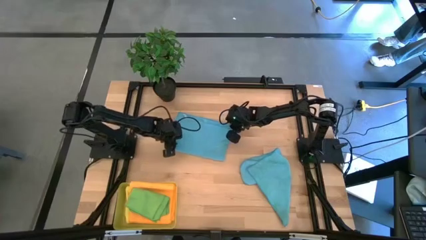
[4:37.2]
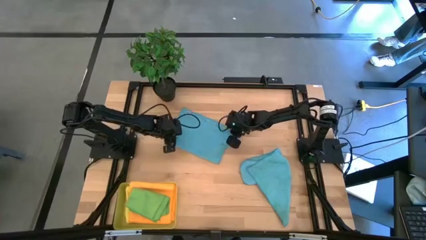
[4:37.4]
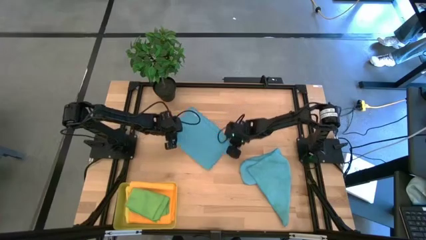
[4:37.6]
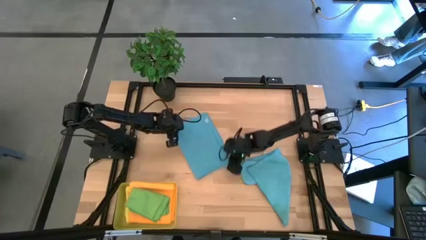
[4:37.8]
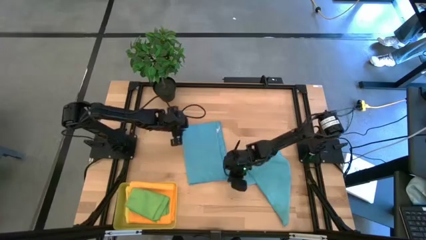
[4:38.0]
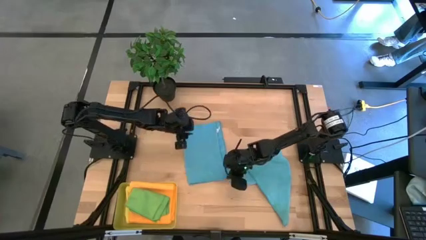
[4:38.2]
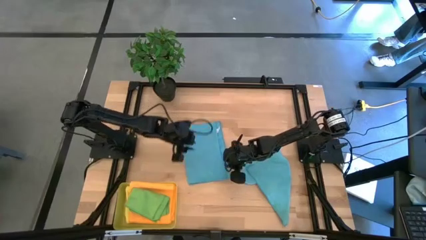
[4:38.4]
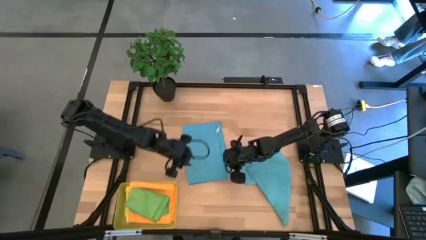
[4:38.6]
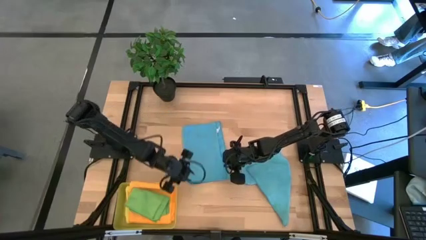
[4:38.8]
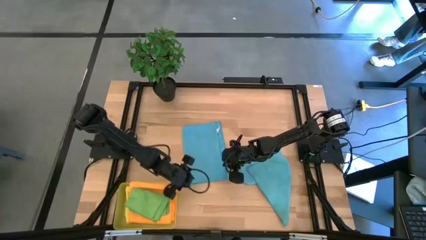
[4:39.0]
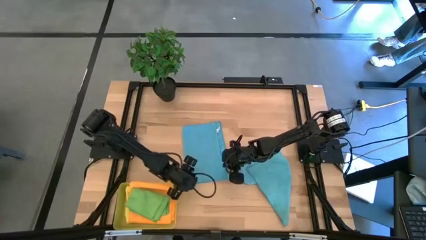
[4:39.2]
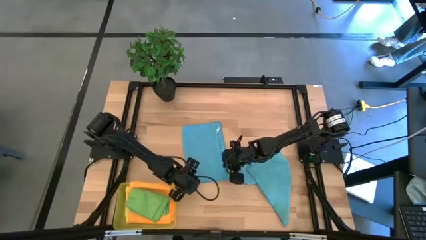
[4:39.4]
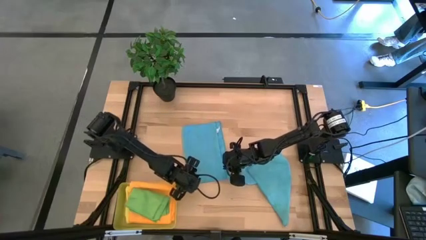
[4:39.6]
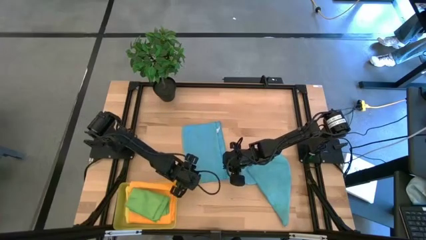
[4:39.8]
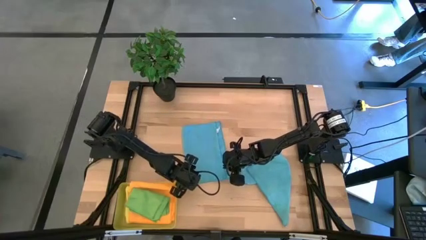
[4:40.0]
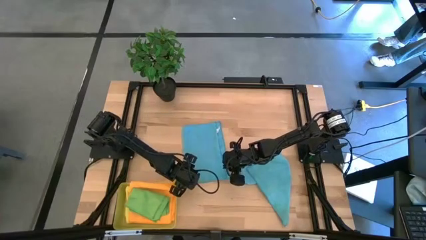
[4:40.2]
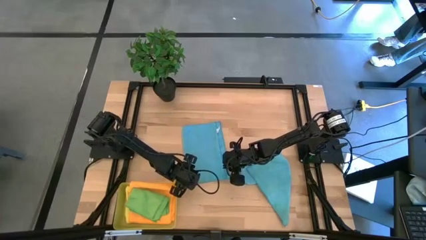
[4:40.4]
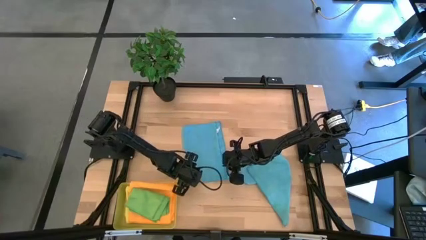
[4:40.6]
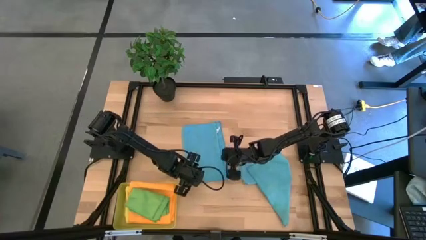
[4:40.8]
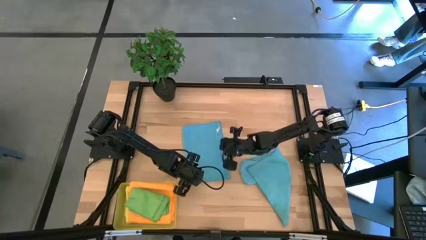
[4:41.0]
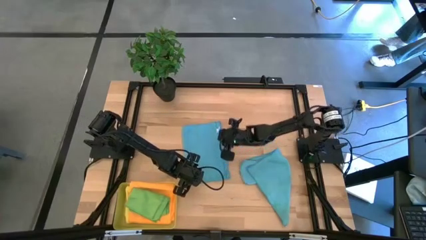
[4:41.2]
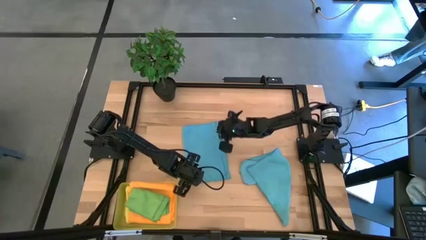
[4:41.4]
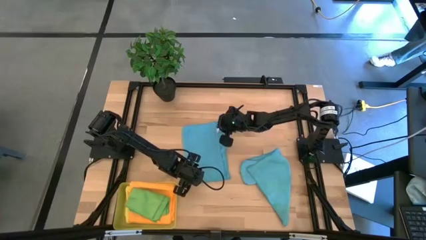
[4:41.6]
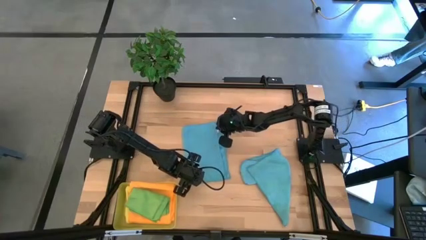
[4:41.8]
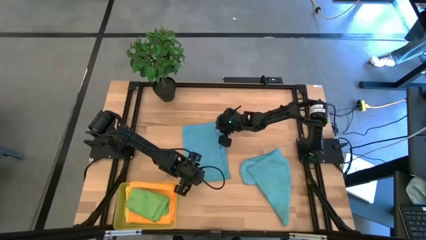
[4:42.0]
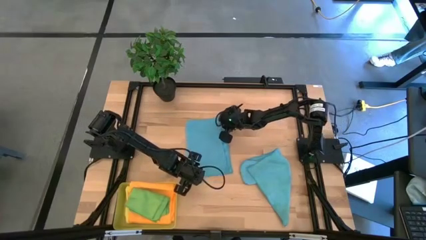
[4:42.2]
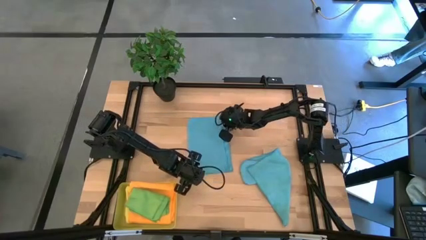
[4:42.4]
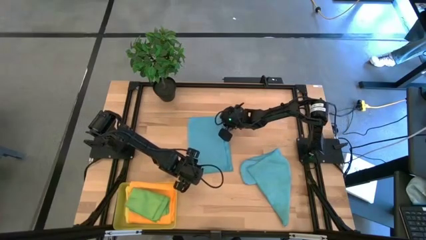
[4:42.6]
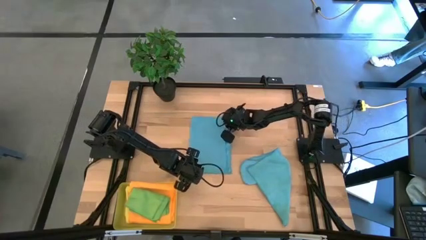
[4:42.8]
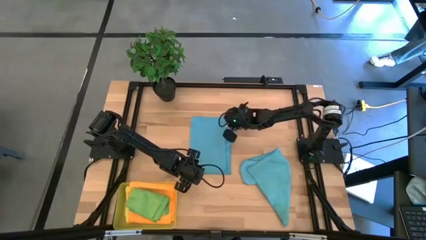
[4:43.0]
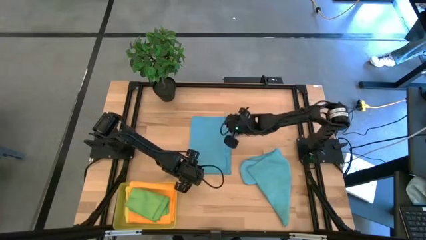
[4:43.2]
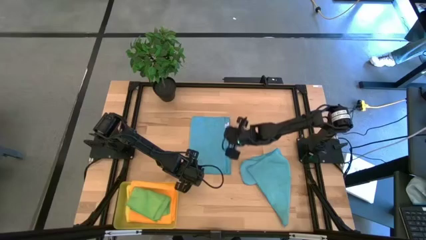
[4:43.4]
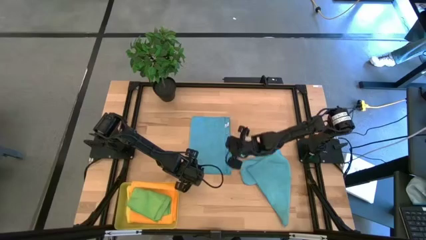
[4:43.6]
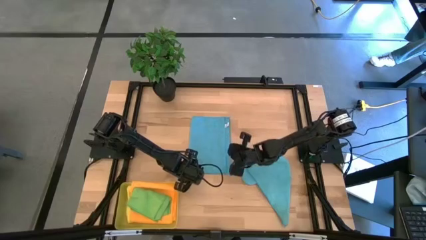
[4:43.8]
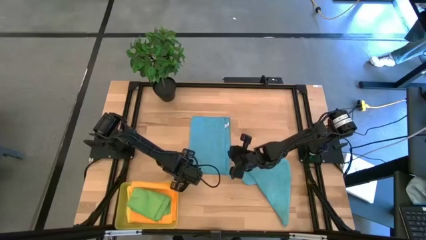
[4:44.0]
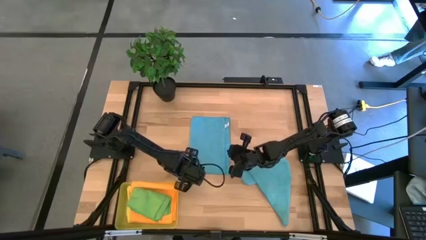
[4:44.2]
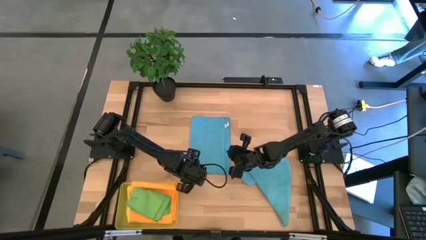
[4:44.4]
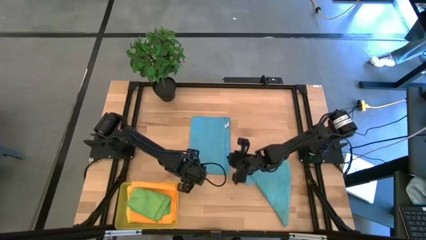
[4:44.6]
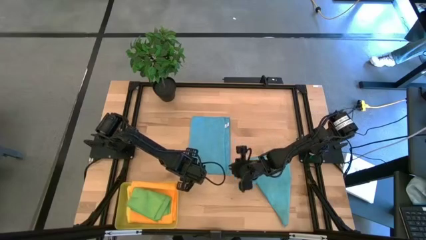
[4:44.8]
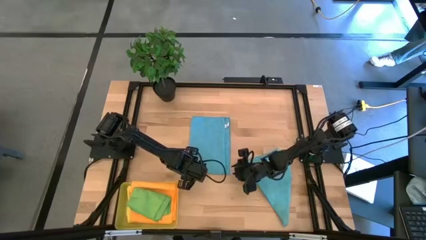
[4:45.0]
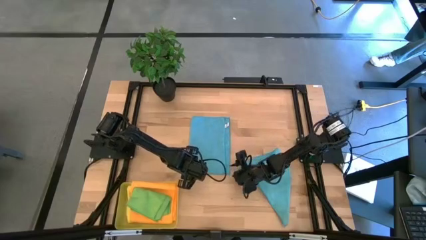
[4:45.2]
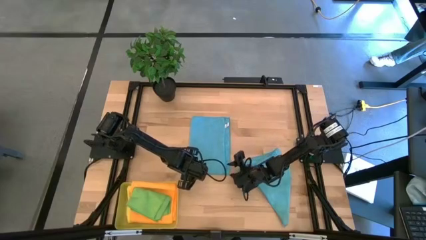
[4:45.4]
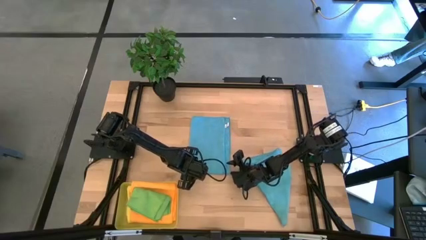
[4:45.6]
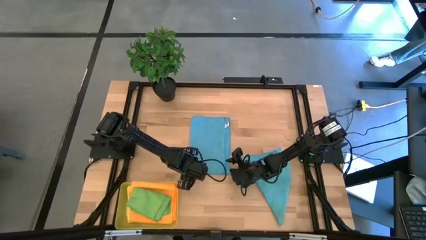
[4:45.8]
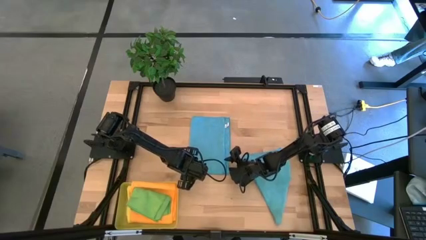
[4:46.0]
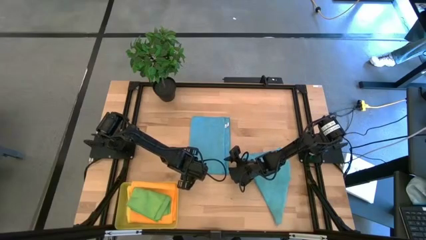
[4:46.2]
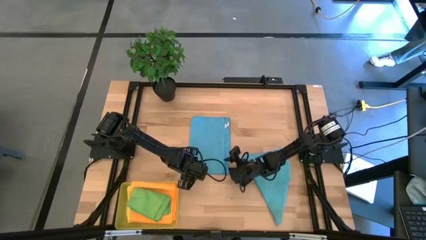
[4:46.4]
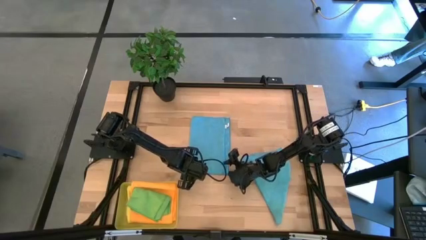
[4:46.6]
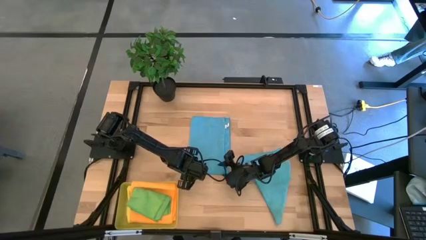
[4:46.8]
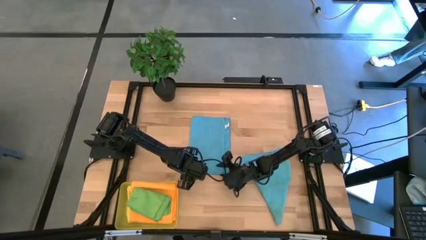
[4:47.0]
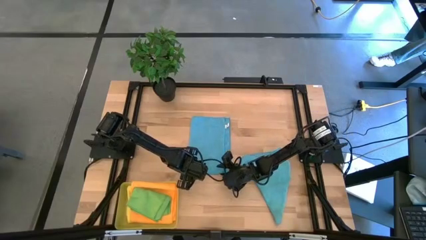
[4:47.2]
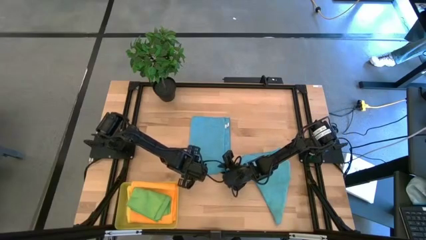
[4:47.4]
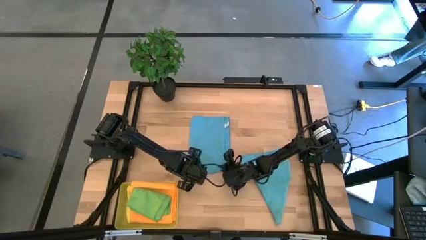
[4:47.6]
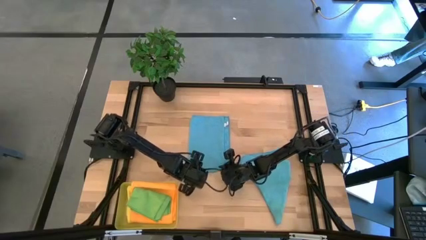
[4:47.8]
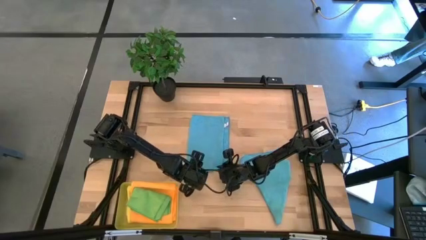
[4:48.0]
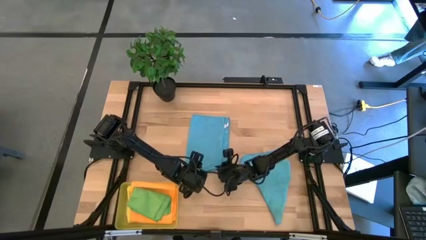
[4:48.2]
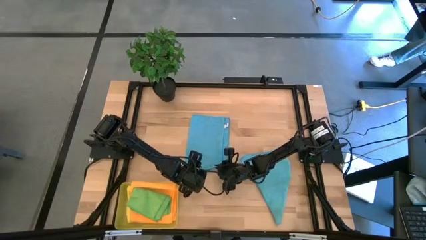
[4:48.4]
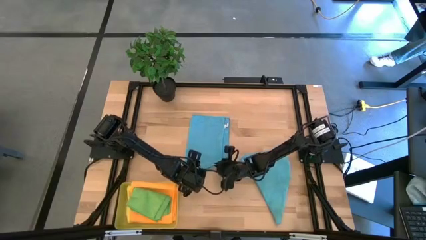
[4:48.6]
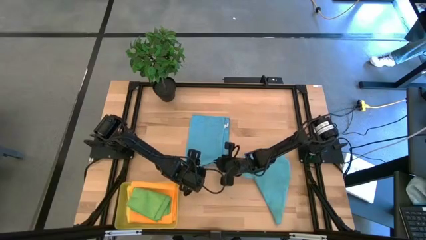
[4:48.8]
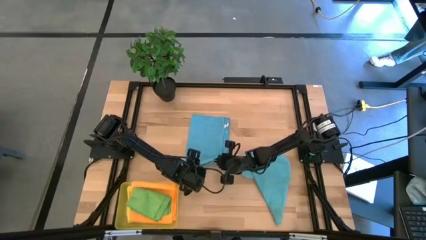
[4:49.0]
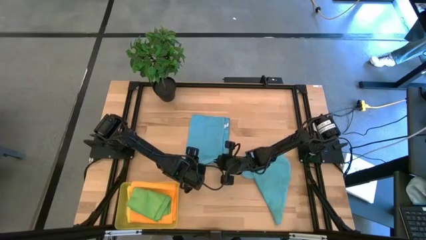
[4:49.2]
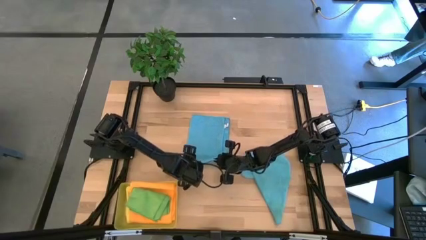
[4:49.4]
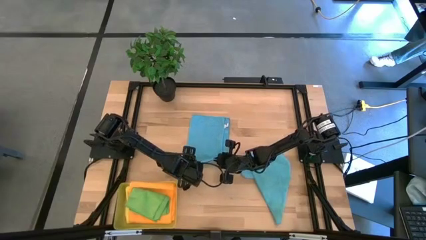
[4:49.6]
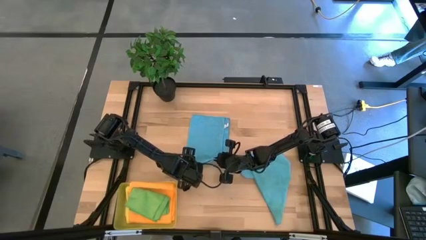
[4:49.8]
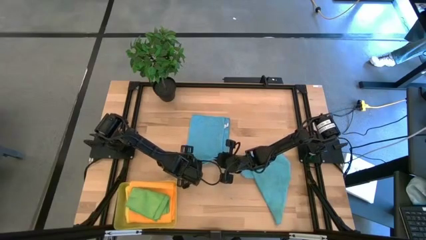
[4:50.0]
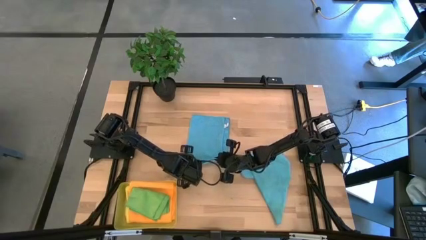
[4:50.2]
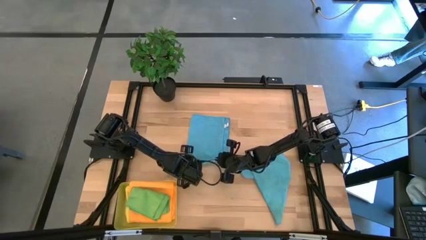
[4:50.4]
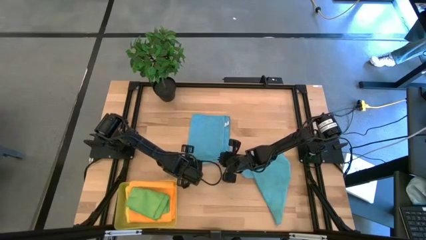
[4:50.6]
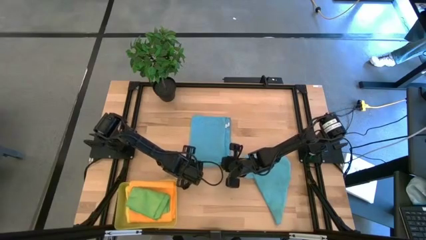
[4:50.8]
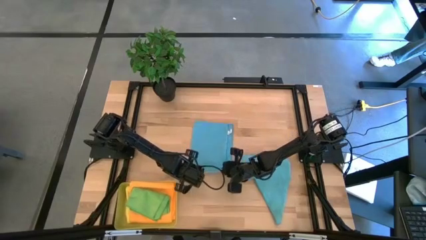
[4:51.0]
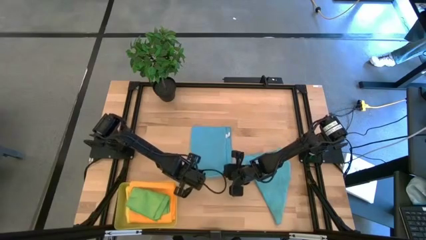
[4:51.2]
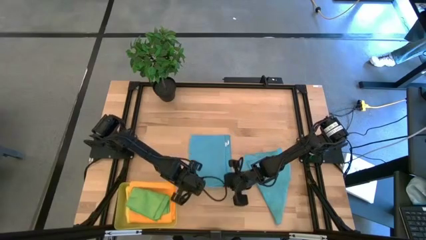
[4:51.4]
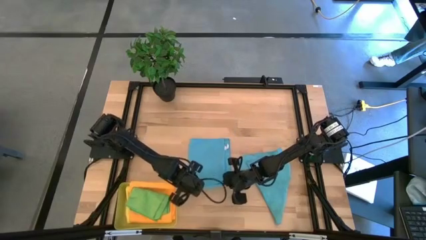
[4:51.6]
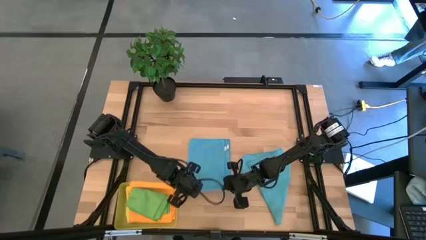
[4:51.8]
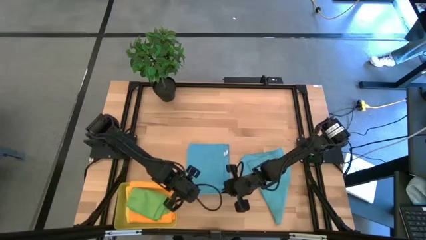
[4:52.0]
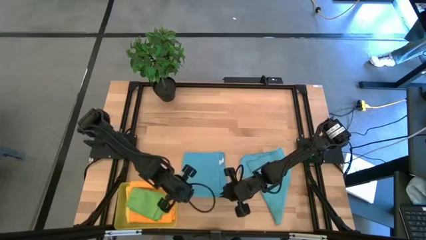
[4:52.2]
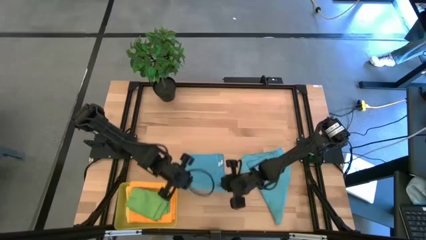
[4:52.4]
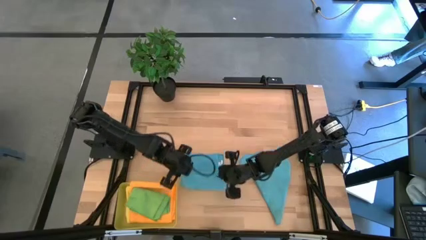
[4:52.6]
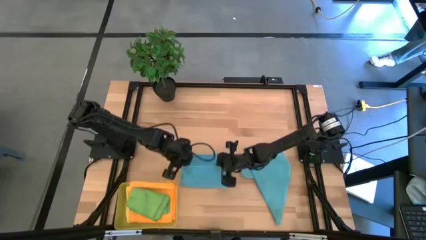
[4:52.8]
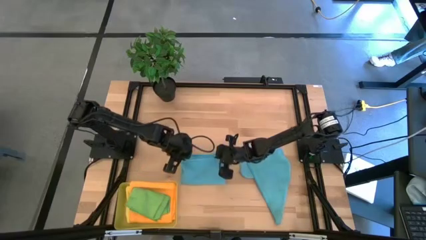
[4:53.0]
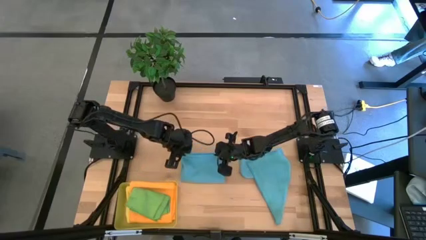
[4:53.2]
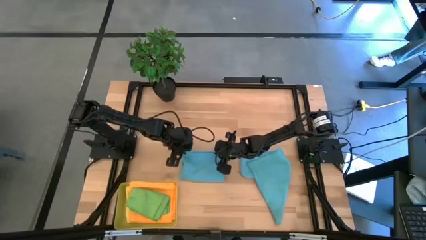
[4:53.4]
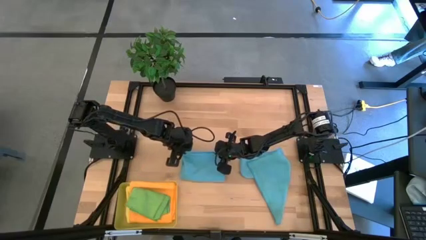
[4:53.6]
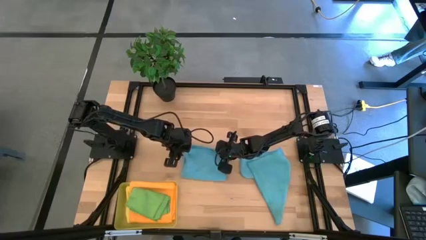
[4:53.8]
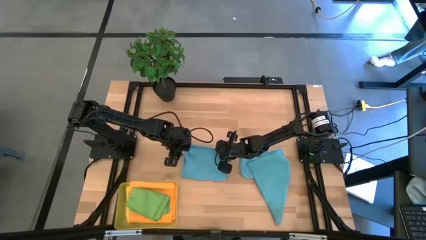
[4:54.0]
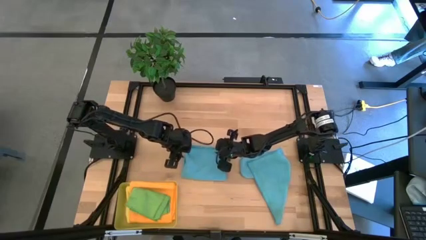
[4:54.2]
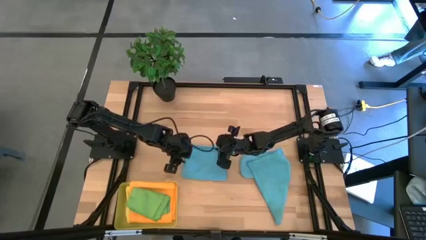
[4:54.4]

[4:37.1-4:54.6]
Task: Fold microfiber towels
Fold the top blue microfiber cloth
